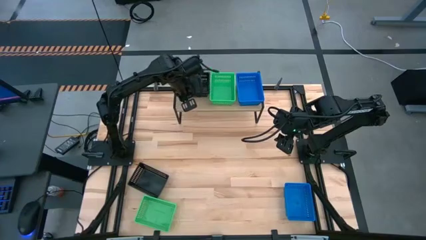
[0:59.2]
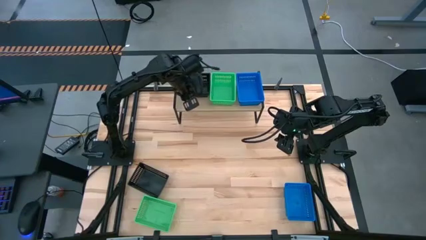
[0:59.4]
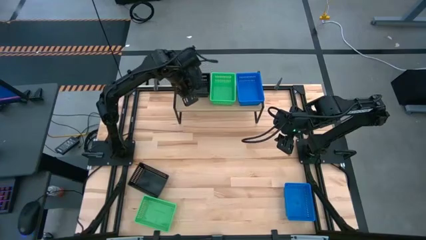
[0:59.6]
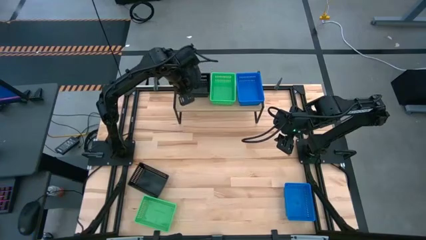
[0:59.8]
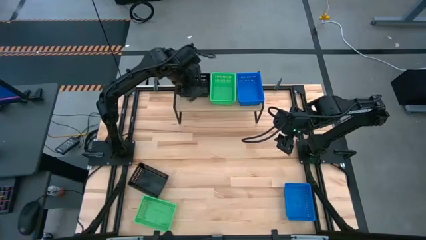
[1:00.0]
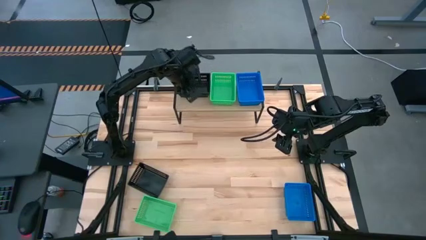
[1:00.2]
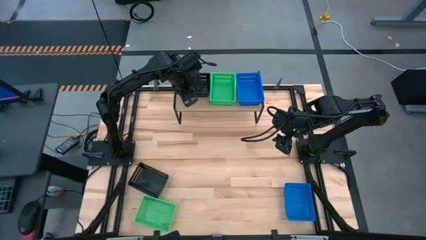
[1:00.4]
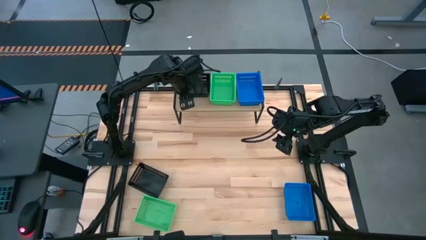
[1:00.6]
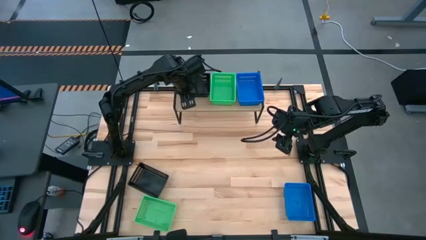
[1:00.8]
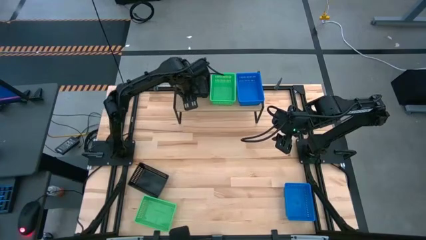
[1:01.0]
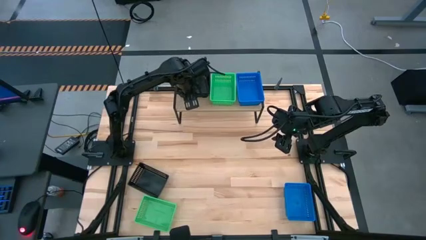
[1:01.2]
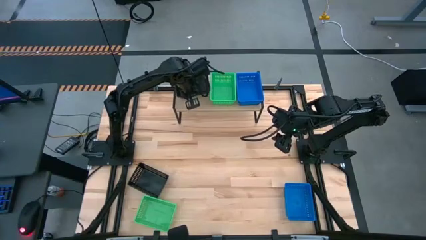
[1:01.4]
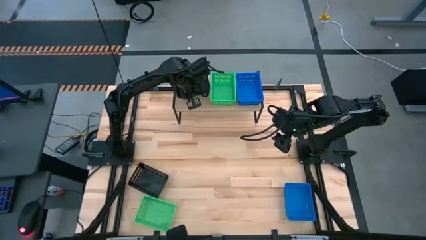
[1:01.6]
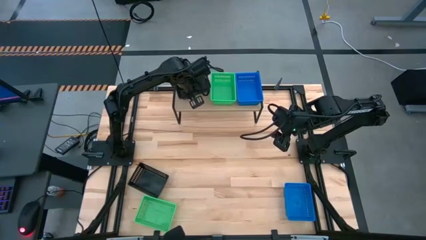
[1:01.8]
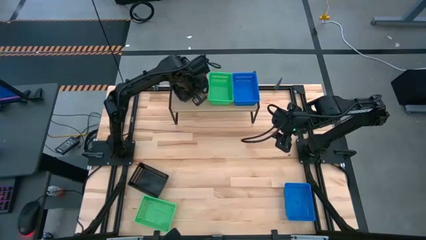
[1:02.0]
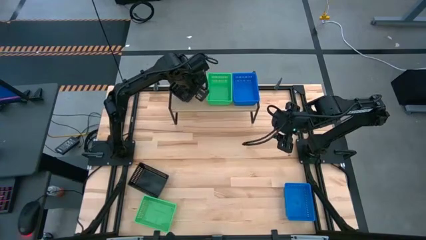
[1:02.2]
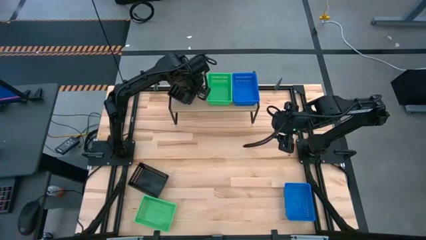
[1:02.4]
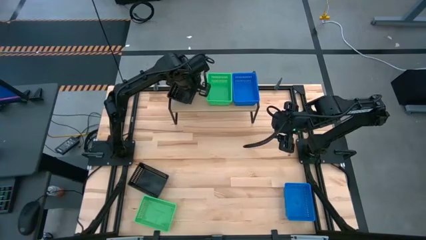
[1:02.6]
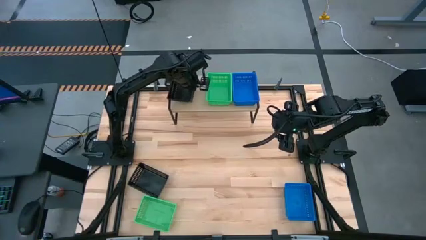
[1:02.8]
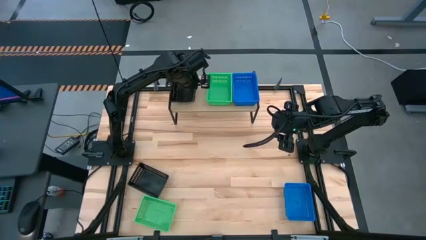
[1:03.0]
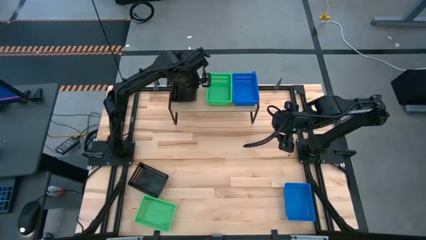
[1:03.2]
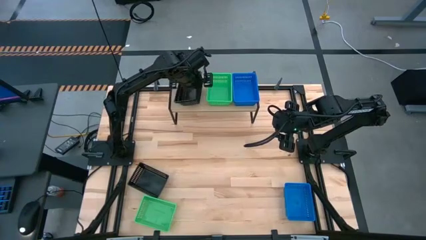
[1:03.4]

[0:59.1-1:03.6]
Task: Stack baskets on shelf by color
Adjust the black baskets

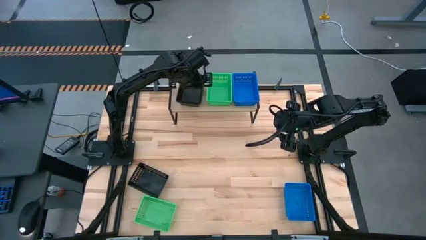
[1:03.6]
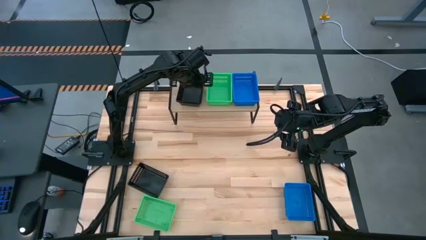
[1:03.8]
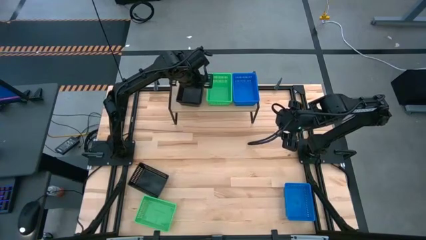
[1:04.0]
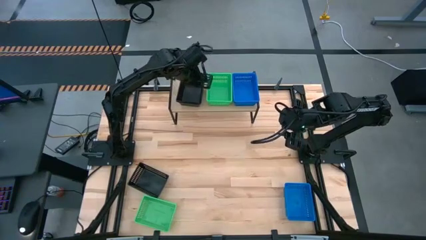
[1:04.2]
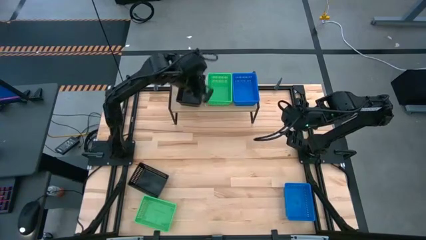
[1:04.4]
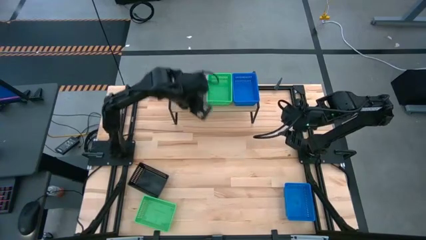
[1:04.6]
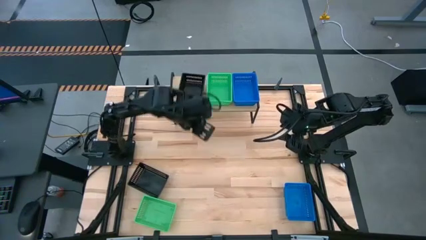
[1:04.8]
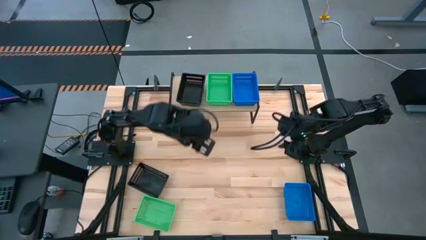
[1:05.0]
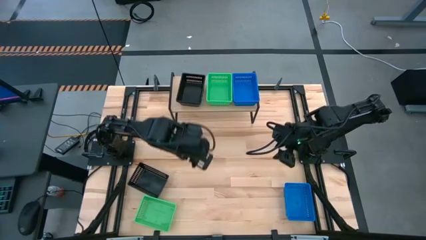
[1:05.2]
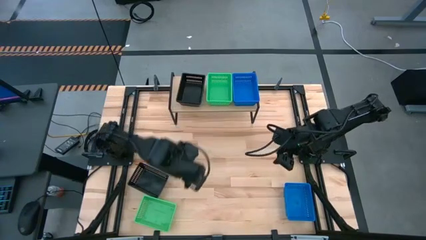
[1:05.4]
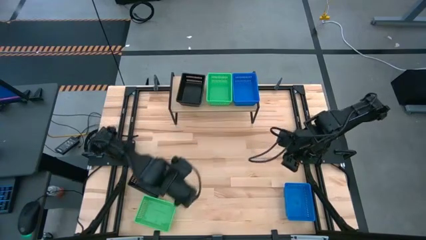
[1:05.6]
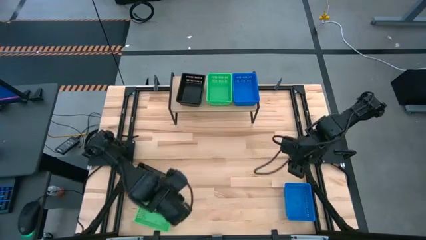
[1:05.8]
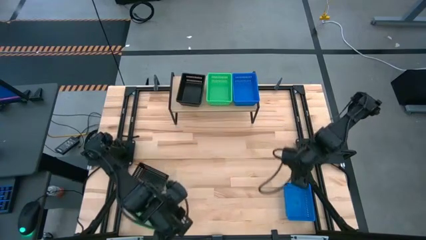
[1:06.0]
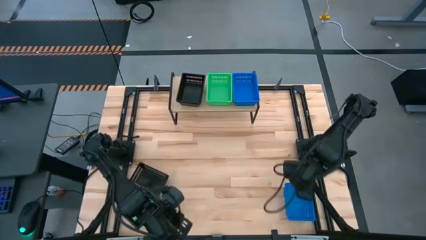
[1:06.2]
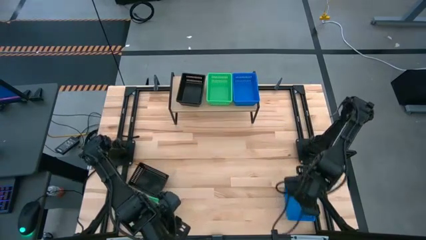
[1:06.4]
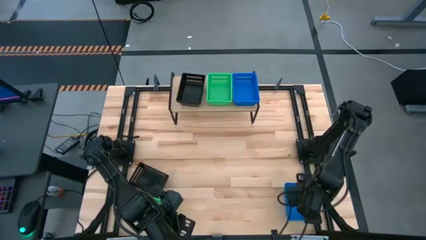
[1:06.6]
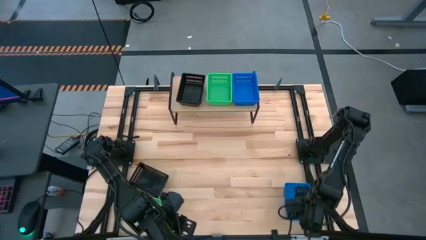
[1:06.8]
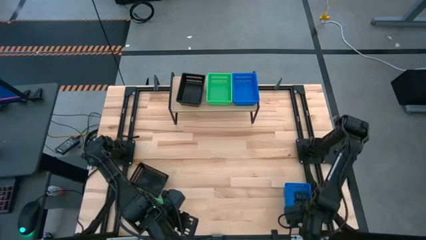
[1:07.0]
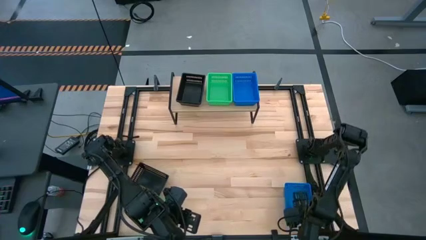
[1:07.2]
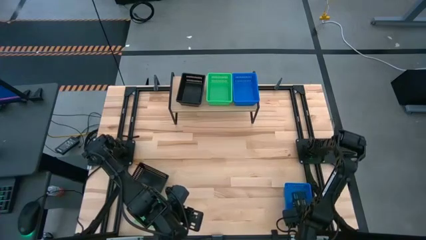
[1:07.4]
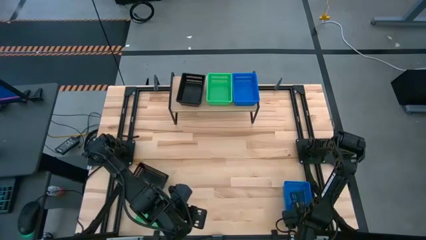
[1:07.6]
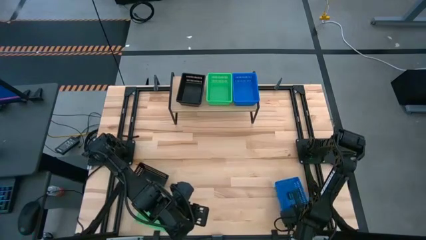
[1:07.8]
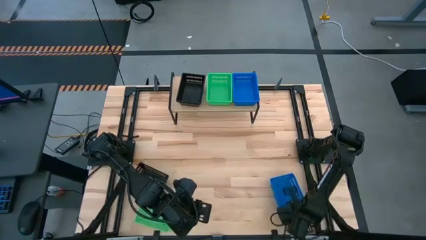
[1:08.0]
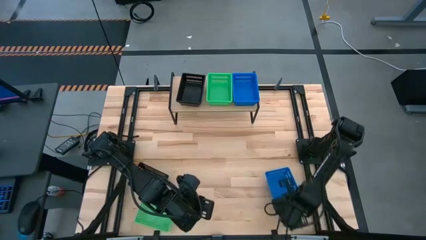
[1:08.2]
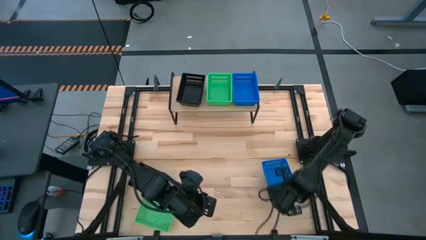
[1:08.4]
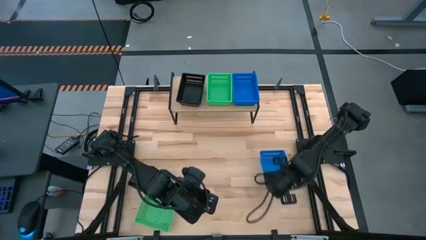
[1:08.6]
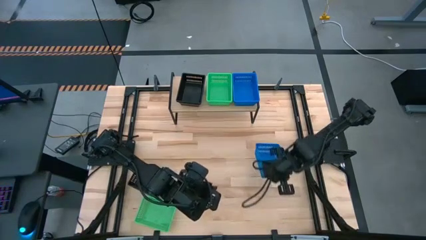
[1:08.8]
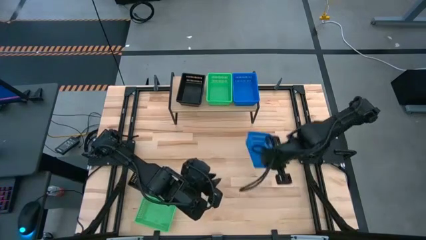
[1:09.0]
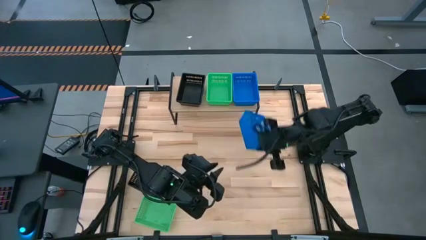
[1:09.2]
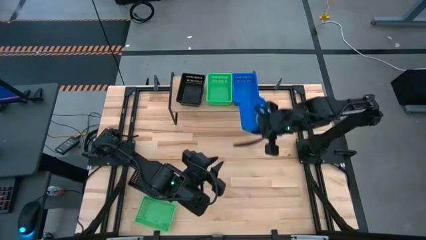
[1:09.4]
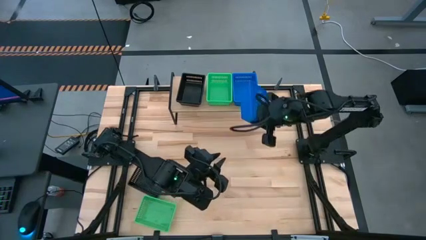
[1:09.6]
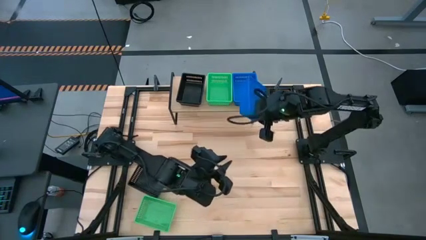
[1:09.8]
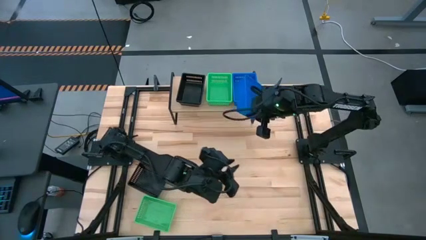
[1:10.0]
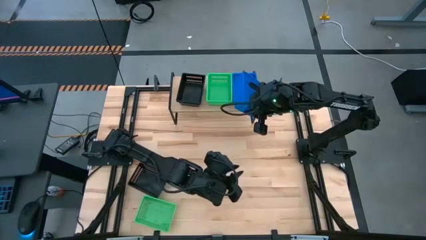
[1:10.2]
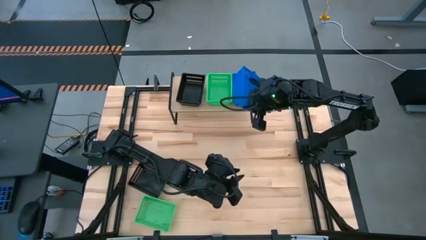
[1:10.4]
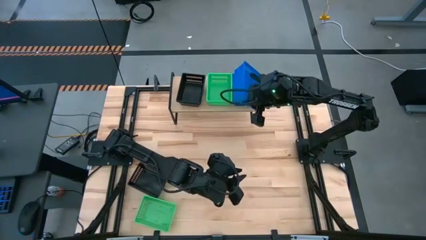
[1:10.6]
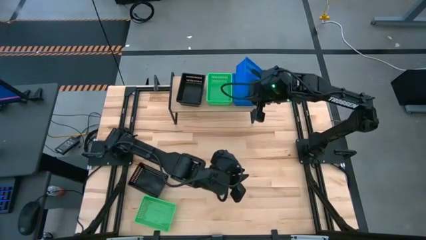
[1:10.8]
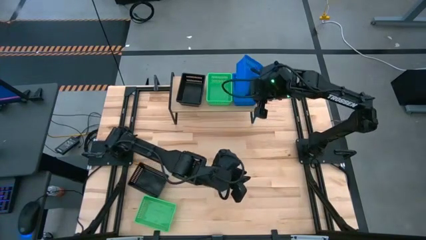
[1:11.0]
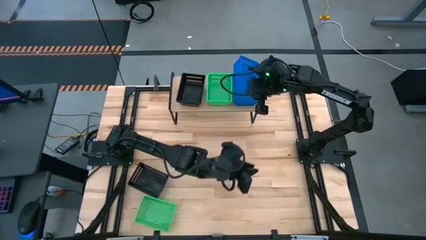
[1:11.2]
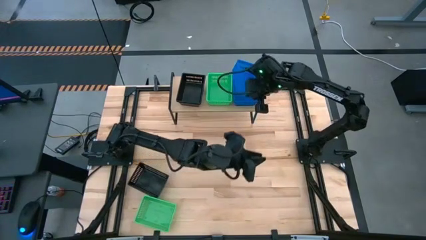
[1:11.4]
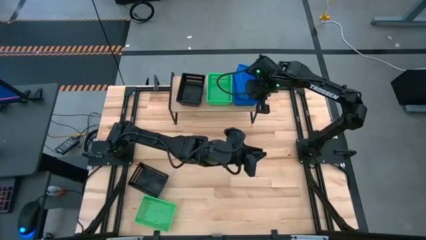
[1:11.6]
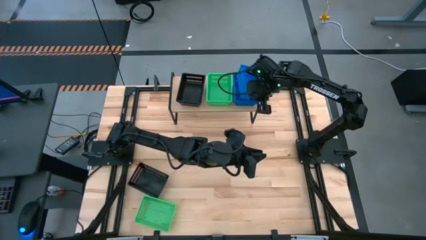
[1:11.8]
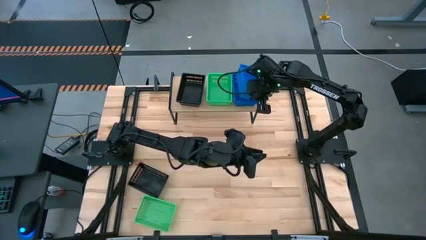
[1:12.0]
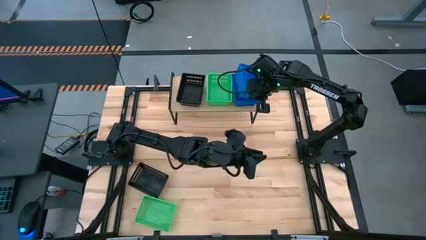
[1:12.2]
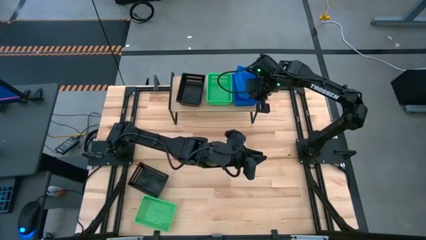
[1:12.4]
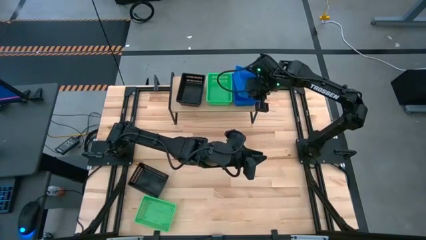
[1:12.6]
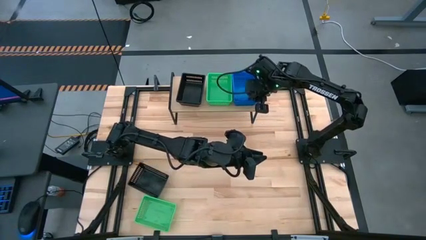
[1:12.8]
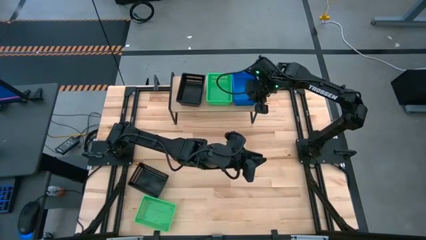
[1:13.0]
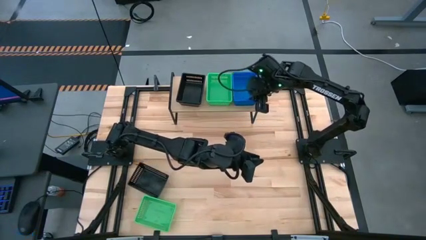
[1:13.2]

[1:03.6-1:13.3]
Stack the blue basket on top of the other blue baskets on the shelf
